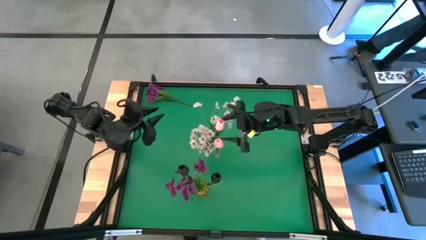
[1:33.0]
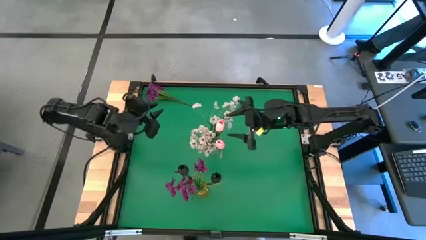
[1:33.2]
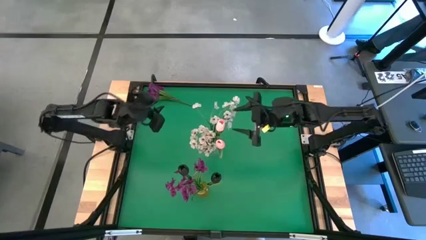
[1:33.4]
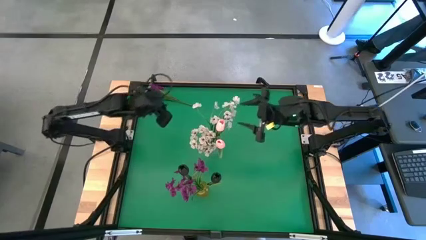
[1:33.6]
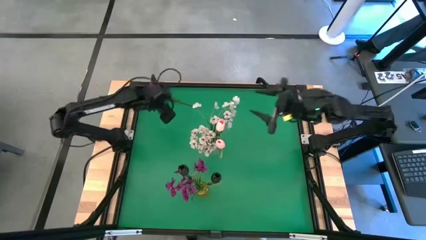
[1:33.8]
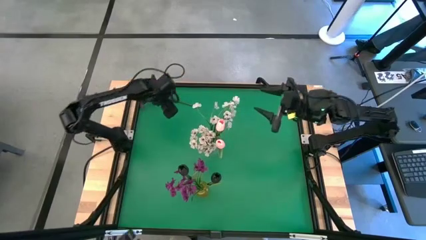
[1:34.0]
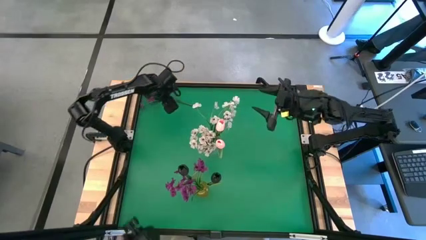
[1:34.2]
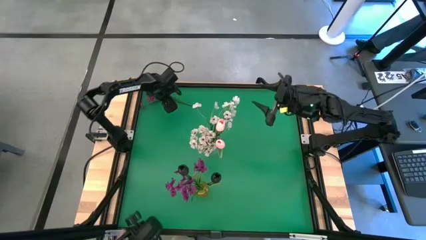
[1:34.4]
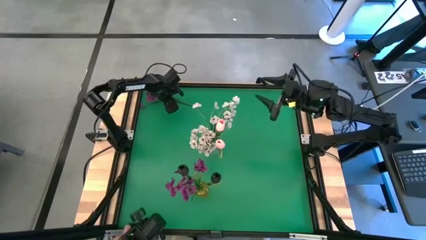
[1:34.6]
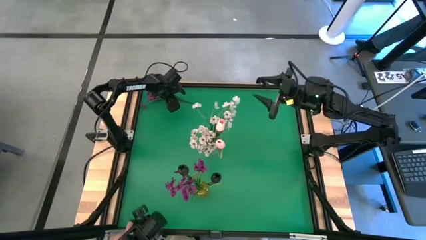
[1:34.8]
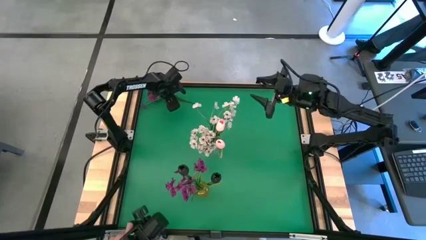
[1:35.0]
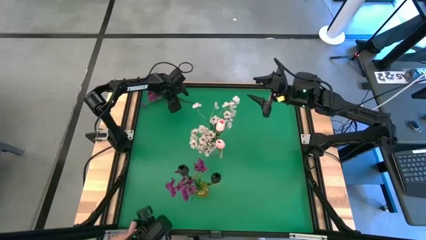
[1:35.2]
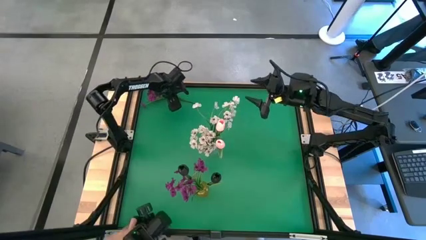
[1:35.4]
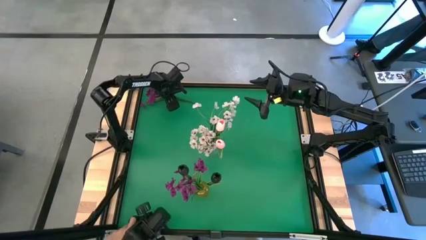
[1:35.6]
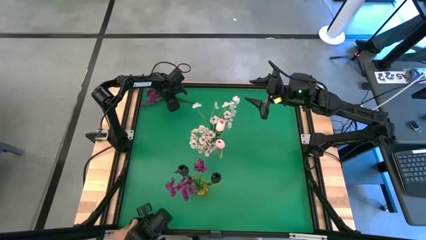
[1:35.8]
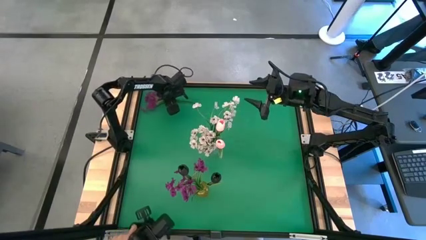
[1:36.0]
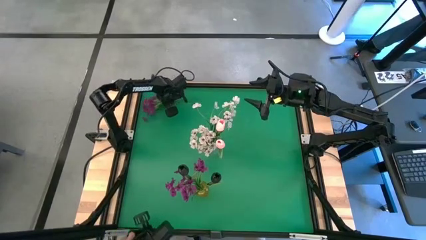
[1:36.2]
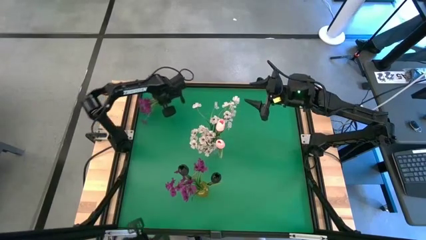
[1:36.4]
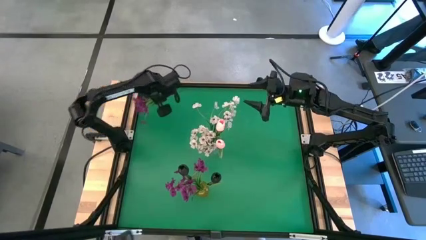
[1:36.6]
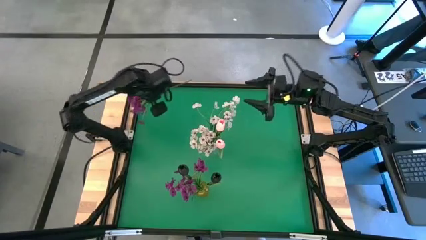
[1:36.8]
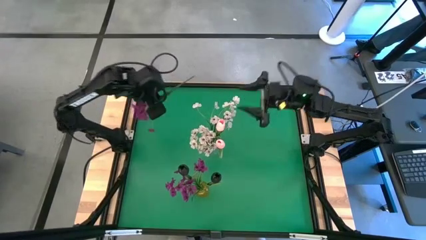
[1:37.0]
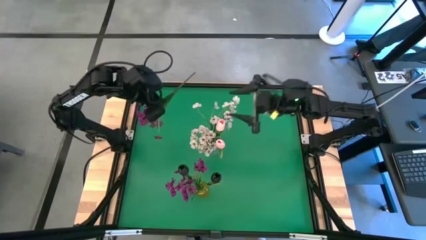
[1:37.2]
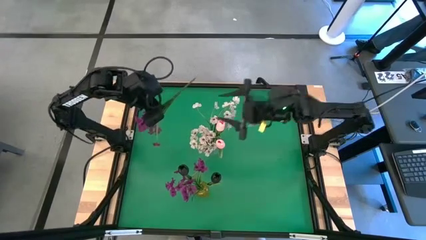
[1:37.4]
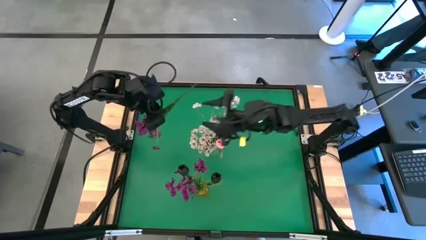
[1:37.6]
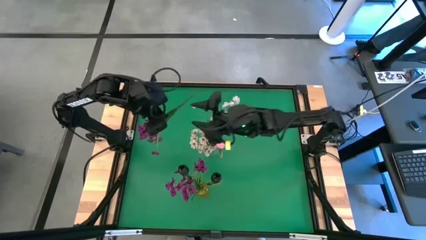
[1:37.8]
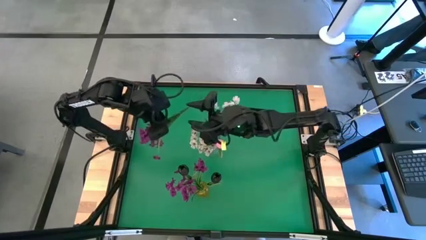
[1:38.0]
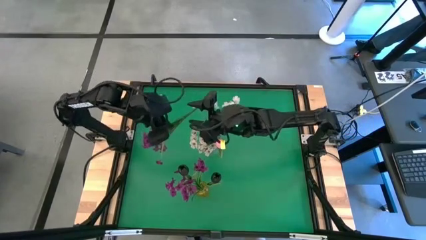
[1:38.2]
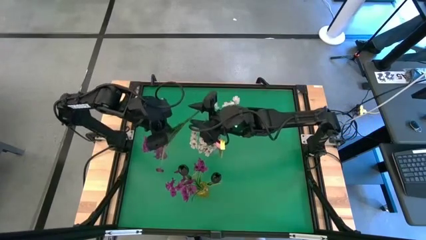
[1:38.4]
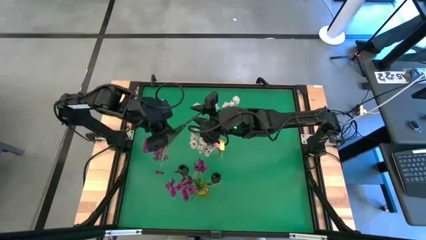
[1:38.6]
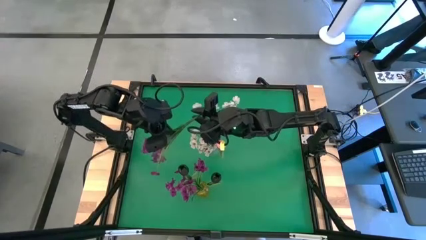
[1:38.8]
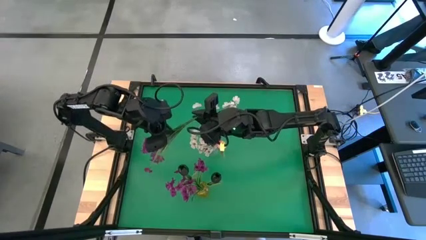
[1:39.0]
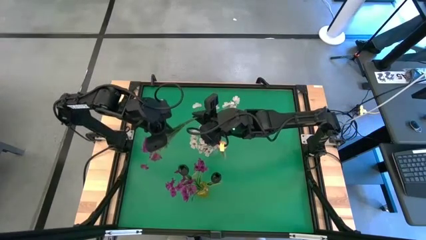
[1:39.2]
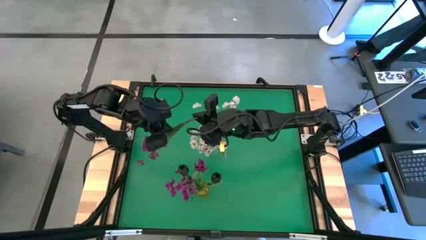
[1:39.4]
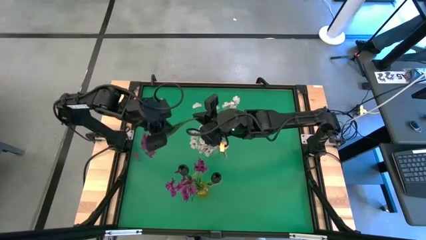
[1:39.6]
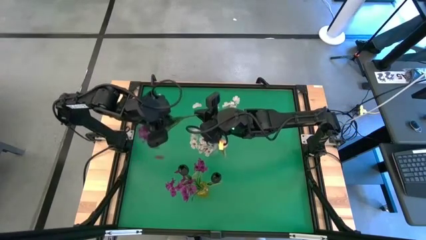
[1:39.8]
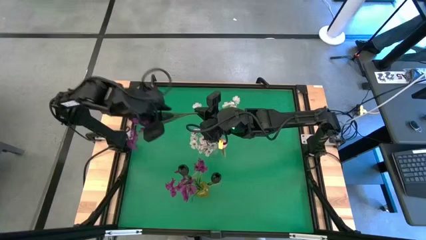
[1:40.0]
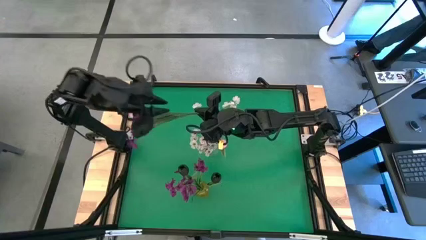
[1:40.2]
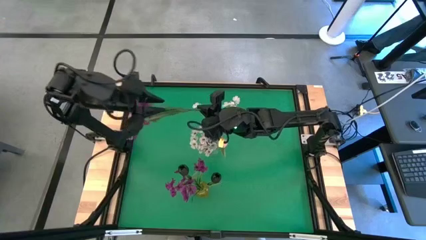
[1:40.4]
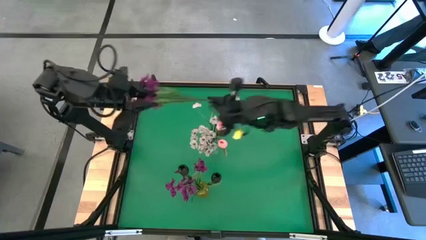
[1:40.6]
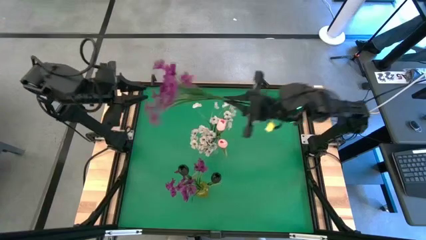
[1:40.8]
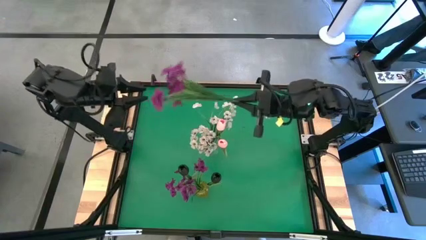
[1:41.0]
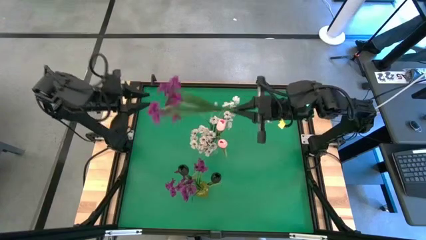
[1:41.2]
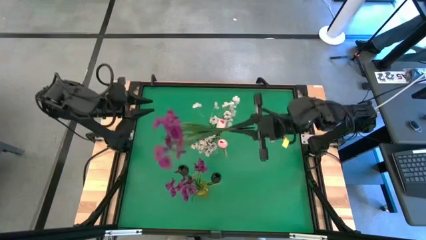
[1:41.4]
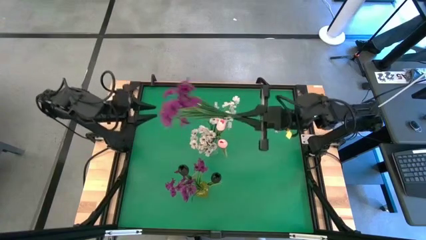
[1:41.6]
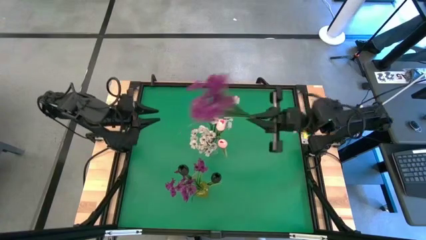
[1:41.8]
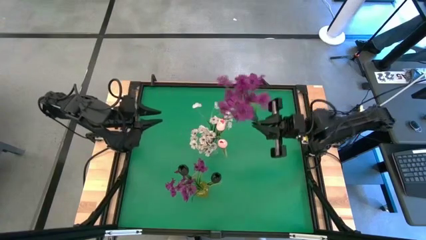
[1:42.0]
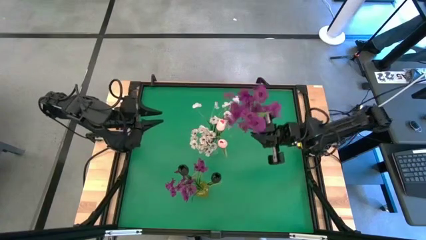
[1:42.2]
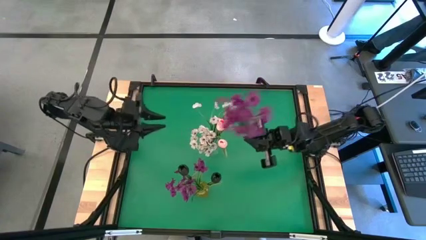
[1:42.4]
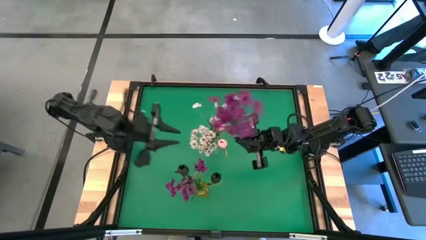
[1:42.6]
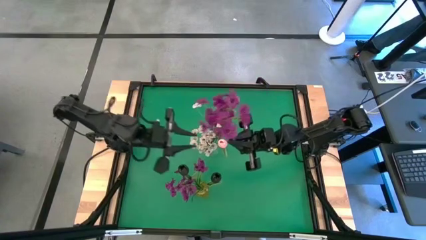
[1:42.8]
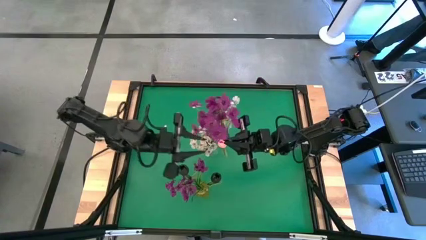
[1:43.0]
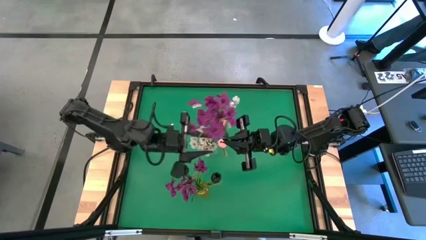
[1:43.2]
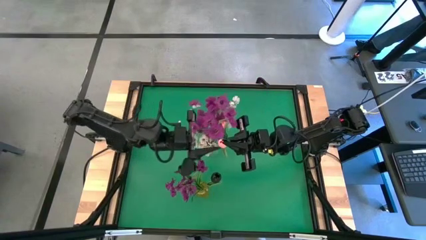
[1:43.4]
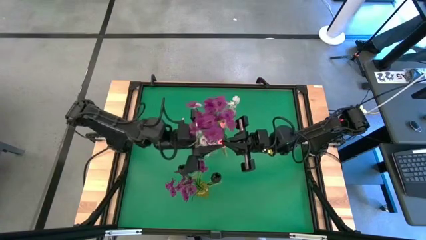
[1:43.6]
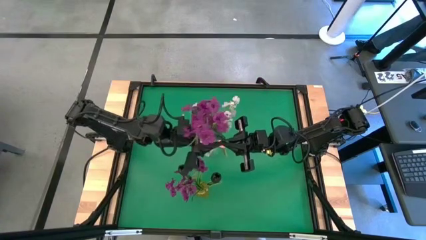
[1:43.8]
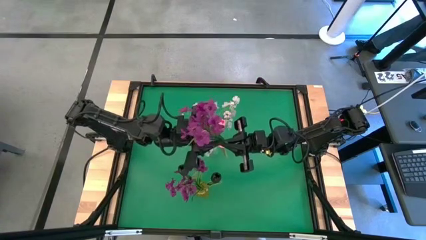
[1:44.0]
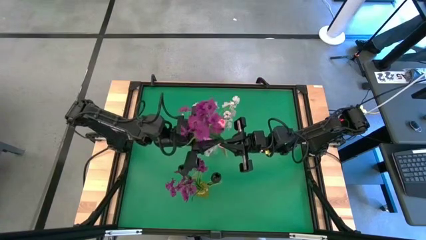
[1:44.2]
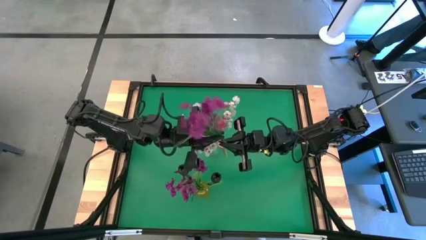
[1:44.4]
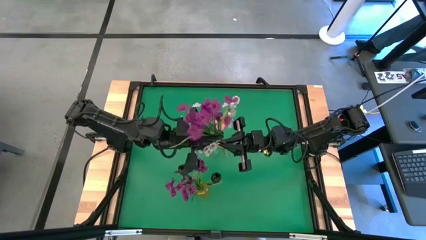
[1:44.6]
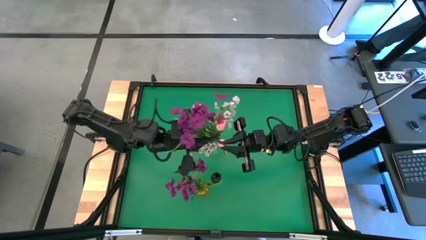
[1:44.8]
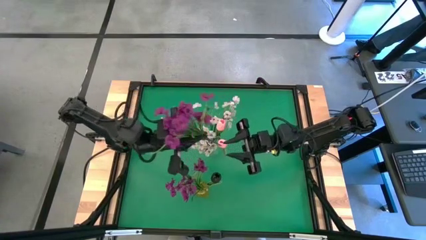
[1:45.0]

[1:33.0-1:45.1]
Task: Sort flowers into vase by color
Put the purple flower into the yellow vase

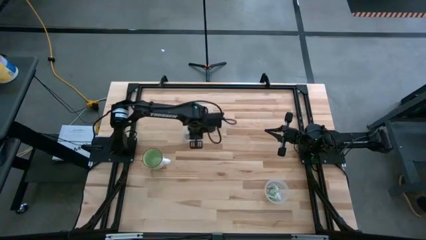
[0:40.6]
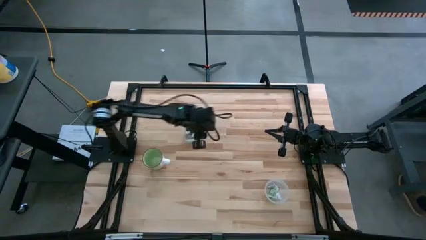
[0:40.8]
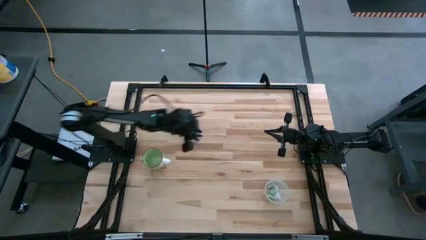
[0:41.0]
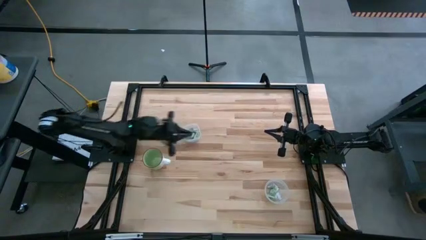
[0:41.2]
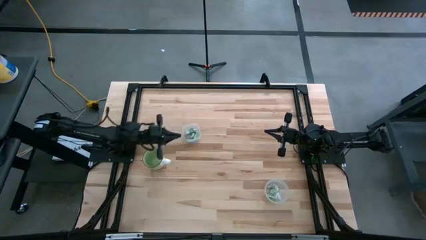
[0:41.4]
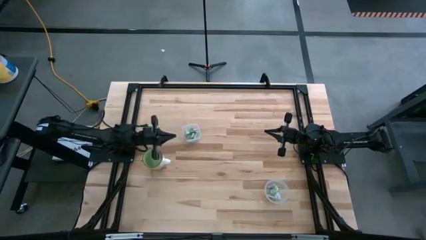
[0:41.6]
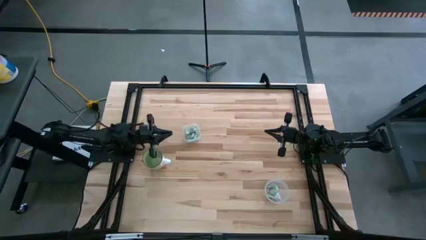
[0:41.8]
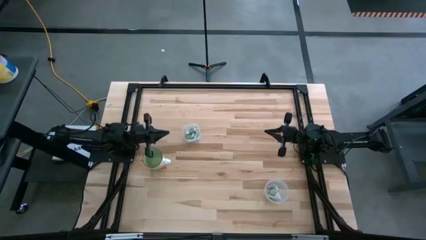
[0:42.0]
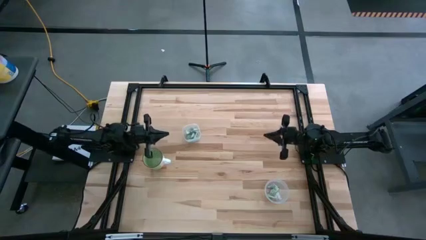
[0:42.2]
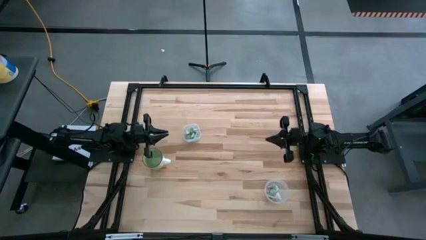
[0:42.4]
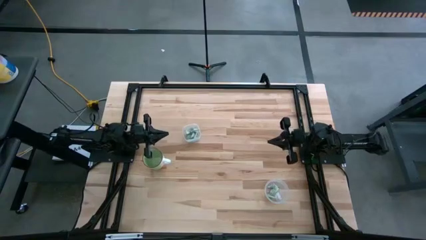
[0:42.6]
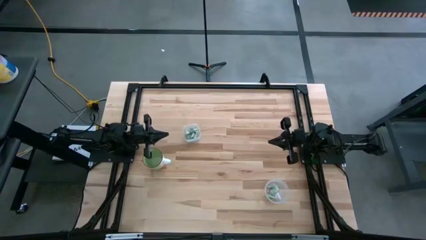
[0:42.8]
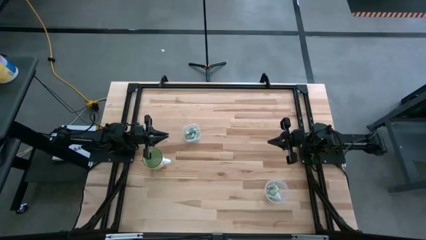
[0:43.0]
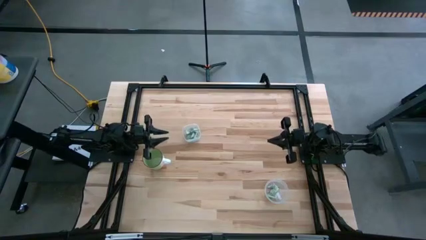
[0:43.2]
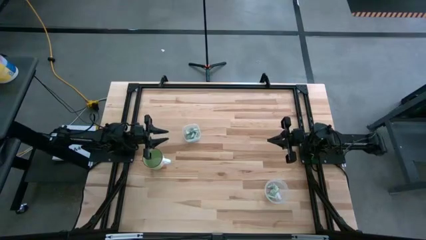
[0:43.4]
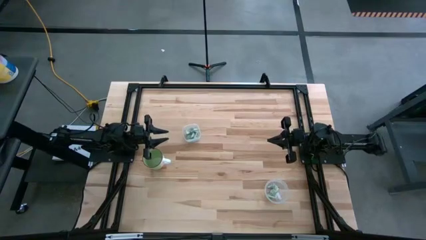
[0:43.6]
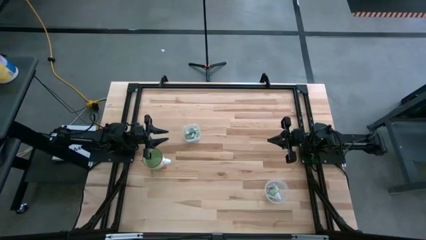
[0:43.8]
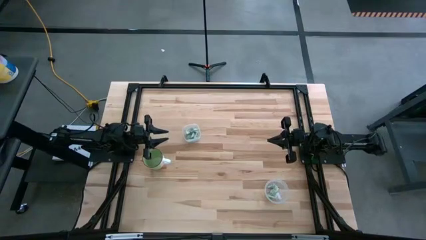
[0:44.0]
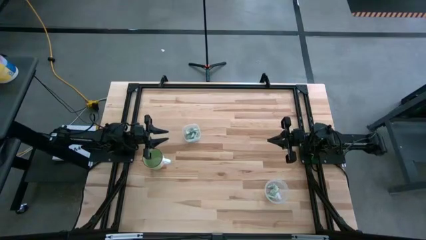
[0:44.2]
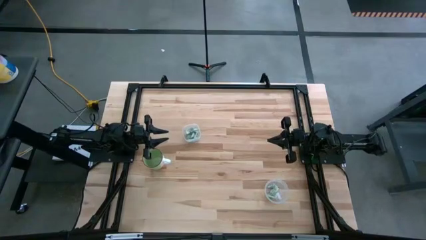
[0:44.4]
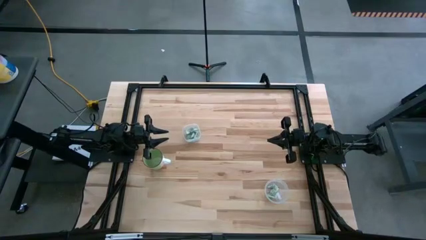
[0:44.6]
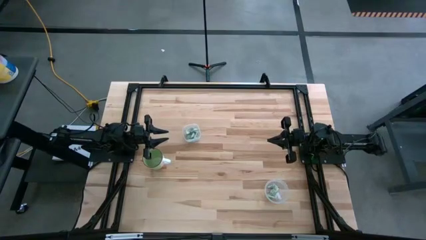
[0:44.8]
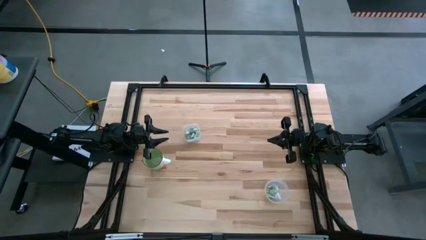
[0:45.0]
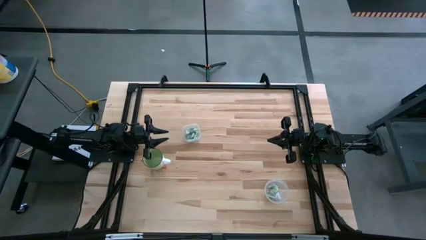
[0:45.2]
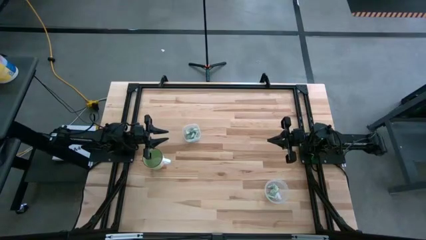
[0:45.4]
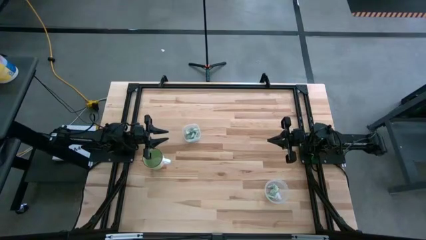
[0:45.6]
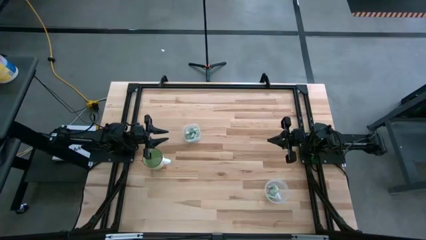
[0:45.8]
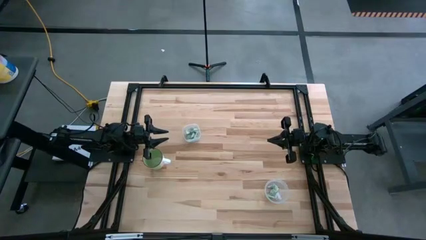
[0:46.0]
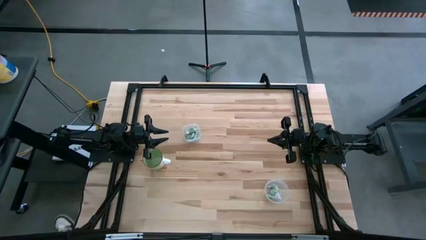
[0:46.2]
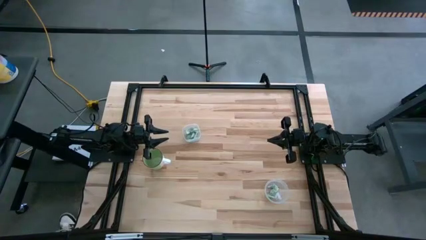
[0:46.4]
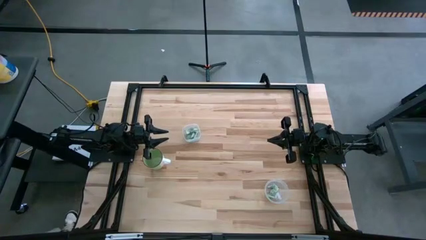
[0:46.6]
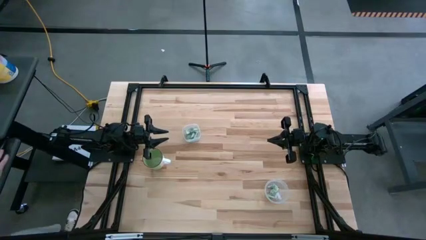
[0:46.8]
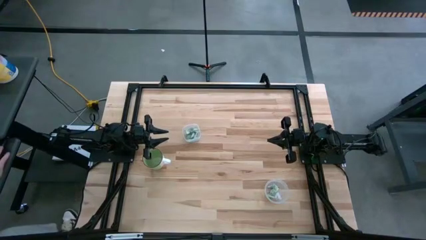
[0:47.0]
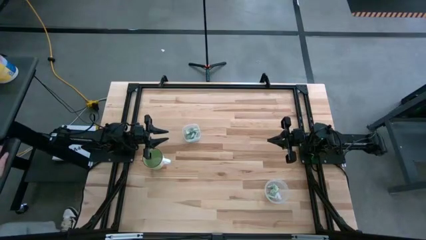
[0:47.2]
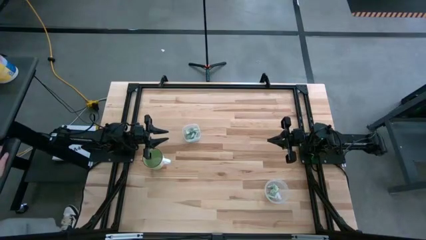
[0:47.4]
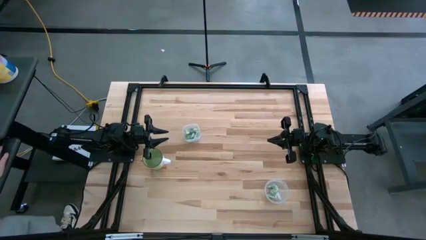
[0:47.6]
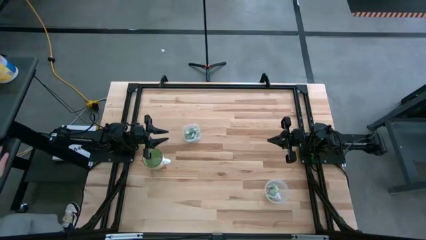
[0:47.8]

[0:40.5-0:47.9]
Task: Pick and place items into bin
Return to Home Position
